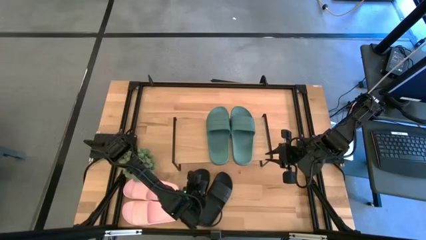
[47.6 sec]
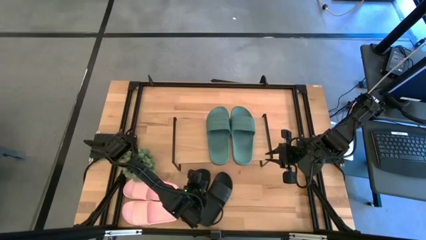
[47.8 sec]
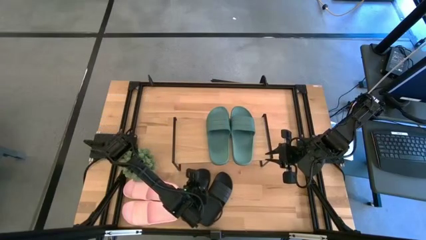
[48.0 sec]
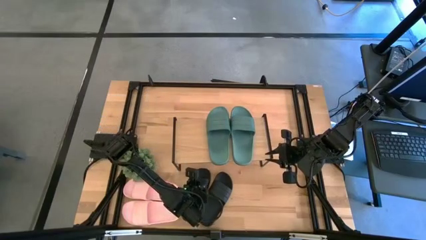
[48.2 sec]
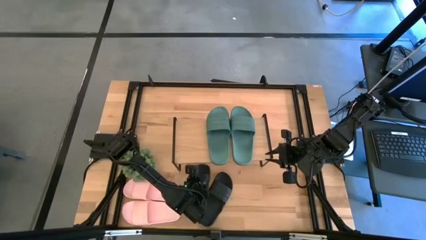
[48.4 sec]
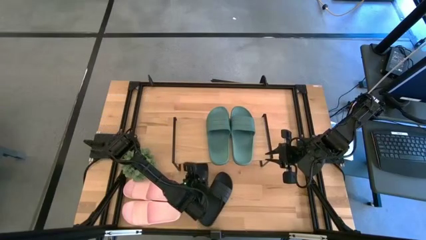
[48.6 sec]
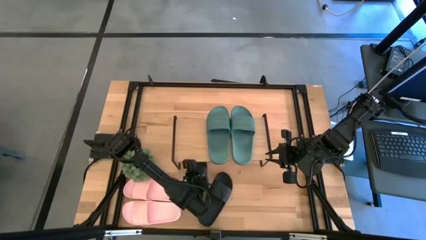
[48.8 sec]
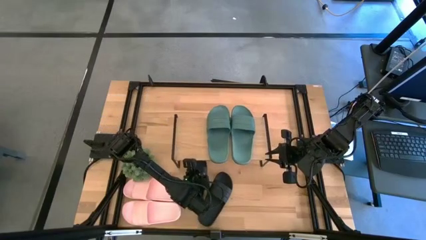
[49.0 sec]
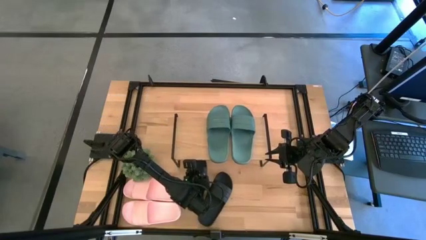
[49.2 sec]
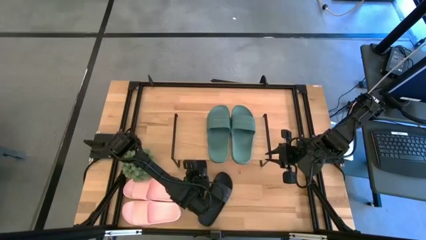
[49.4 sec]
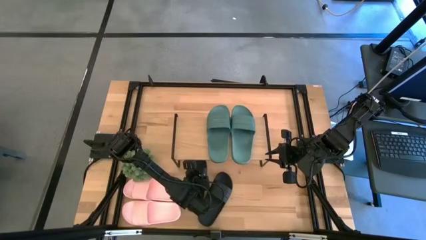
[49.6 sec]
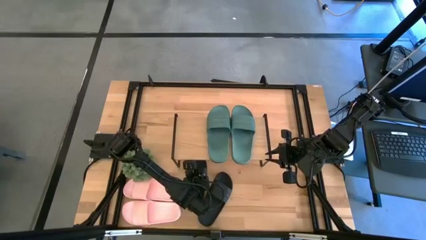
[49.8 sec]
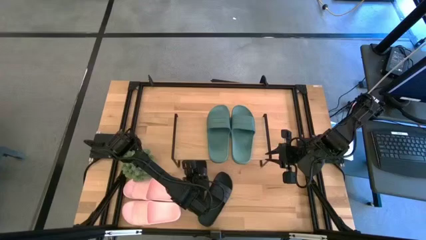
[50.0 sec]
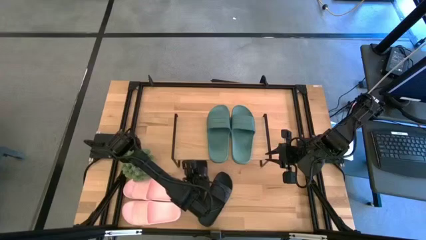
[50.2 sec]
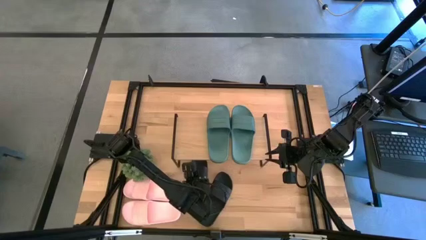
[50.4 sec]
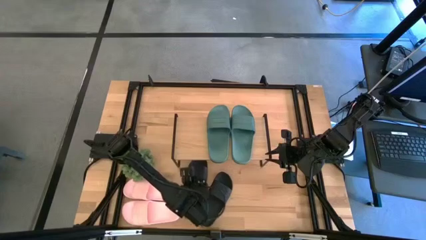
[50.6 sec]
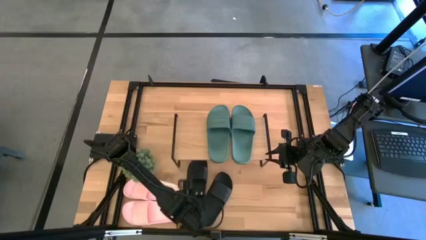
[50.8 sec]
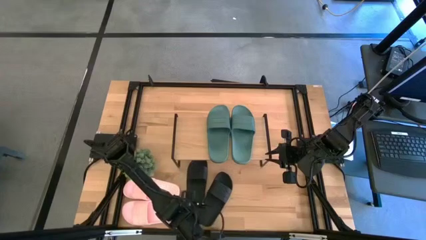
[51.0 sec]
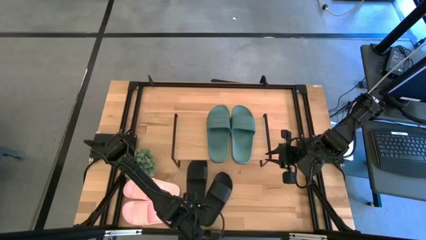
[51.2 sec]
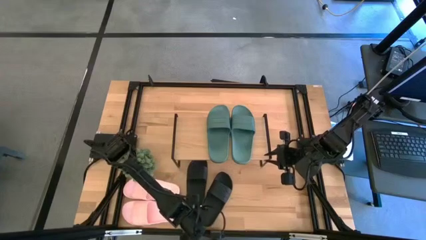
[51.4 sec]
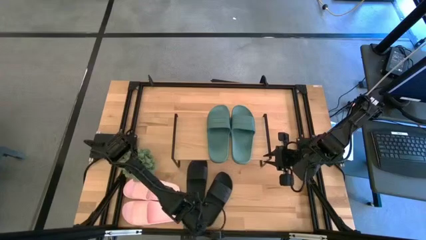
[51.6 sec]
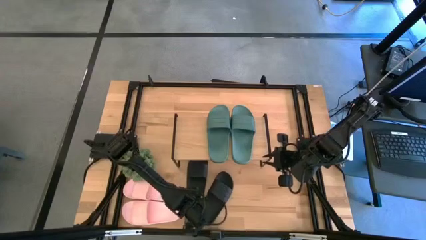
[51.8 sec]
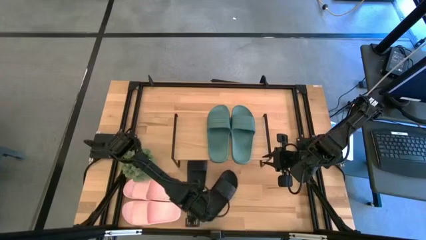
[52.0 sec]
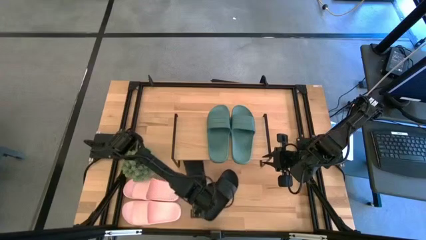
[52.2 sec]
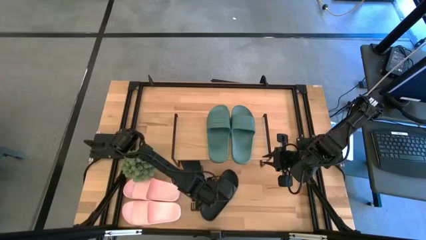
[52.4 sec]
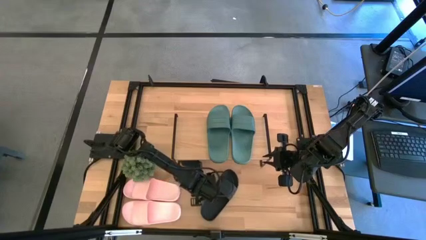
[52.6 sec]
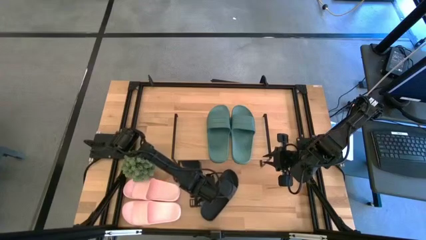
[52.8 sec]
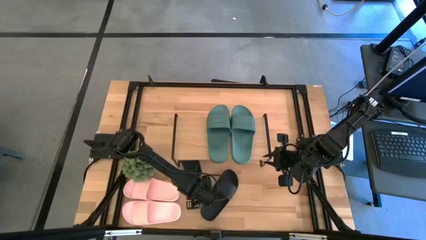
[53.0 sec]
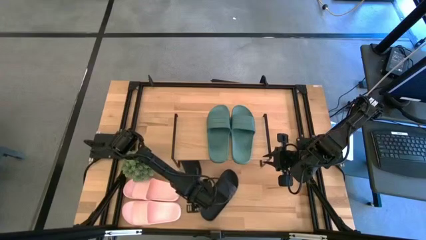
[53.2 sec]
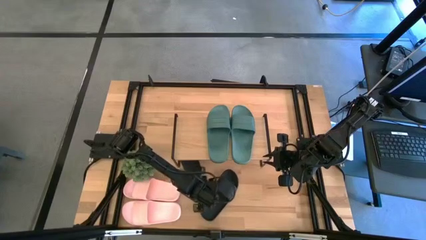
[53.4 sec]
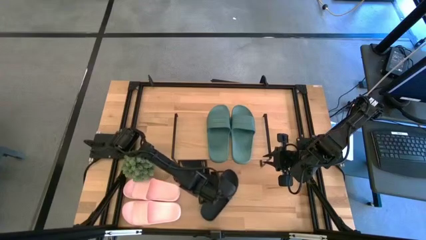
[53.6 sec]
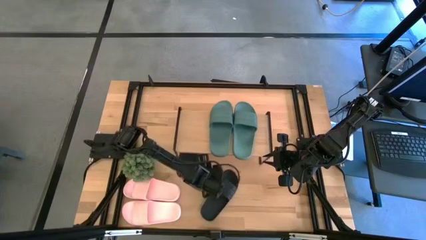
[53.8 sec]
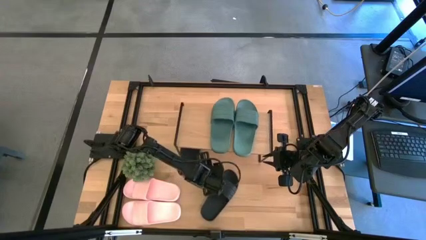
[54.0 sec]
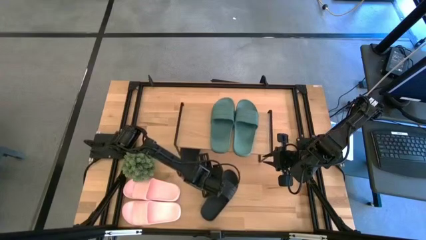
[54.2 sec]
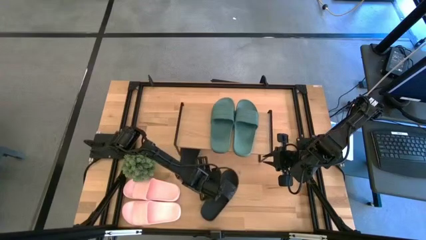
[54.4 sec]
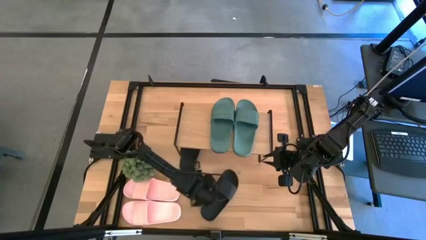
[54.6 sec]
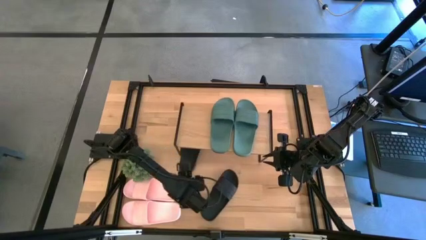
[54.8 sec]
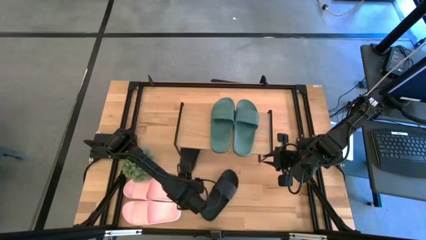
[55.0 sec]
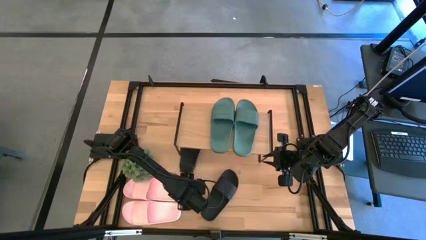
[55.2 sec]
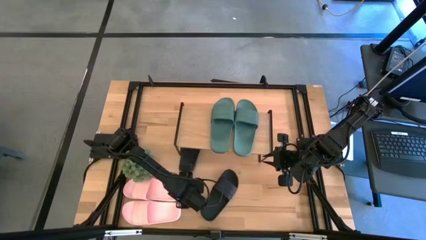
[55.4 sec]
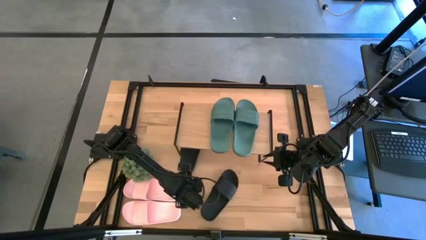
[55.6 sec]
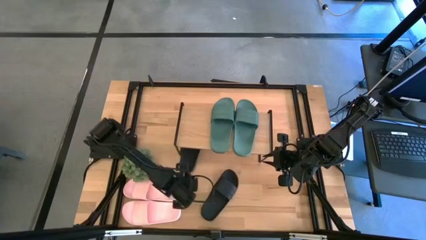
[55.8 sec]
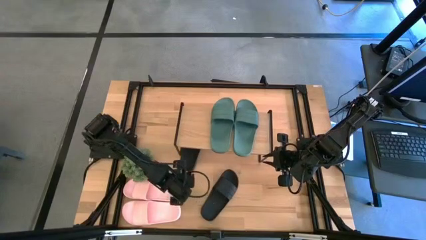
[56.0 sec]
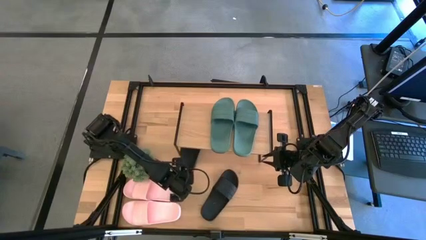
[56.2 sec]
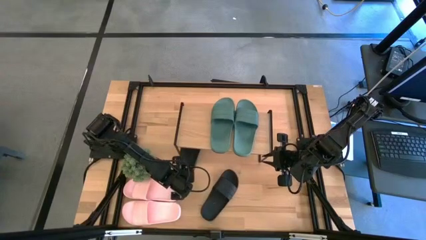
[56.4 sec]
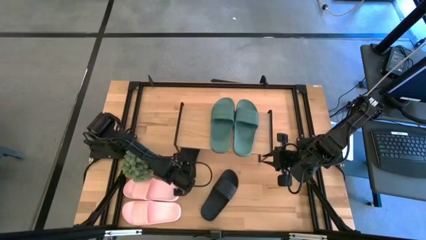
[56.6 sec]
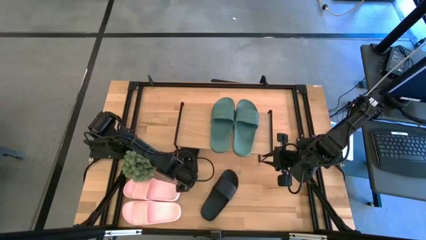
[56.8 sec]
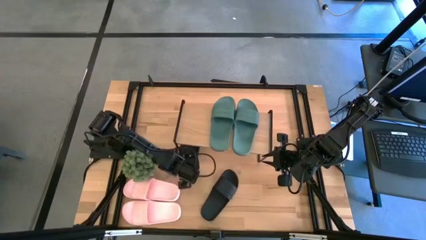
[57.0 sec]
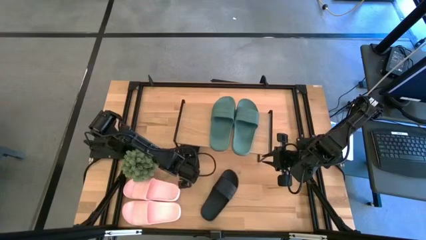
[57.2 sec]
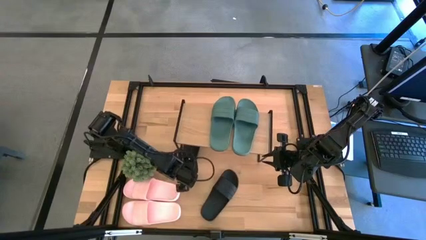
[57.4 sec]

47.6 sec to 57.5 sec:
Task: Pick and place slides into the shelf
Put the left black slipper under the shelf

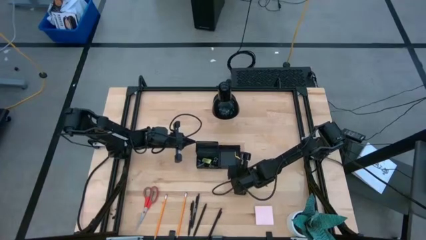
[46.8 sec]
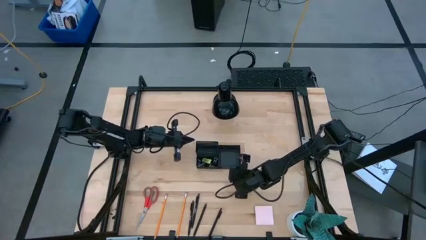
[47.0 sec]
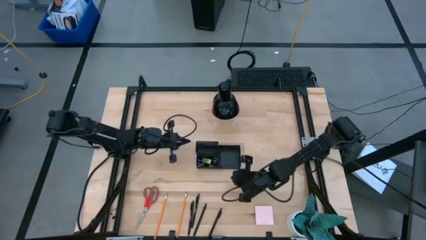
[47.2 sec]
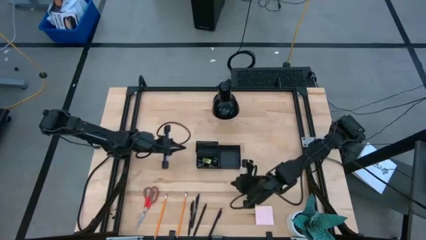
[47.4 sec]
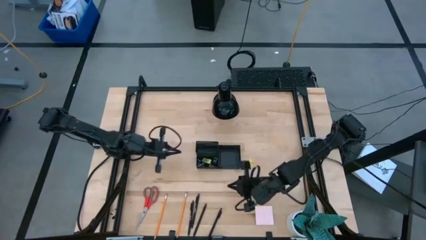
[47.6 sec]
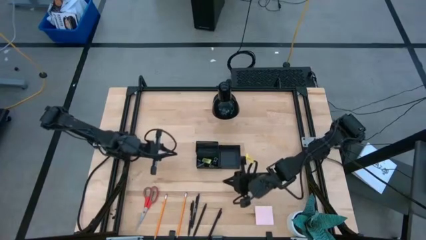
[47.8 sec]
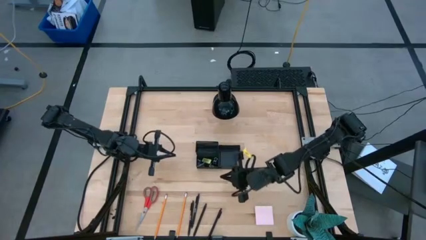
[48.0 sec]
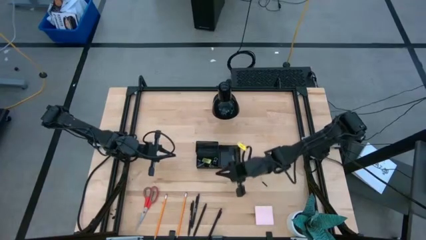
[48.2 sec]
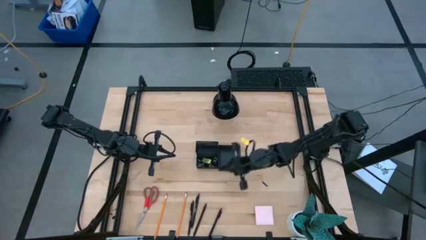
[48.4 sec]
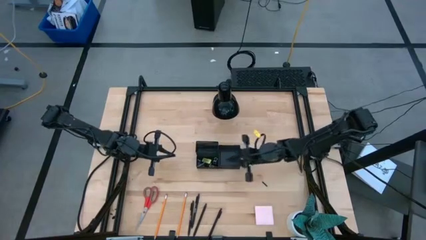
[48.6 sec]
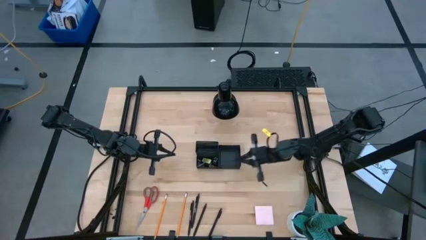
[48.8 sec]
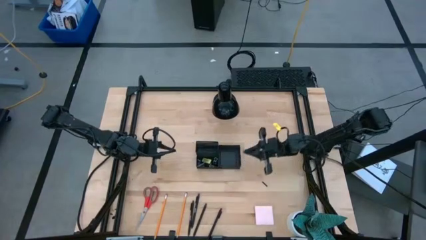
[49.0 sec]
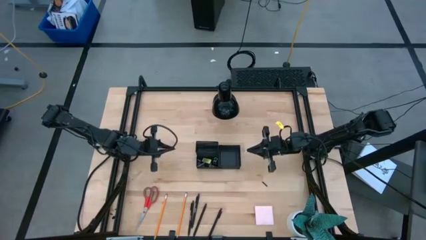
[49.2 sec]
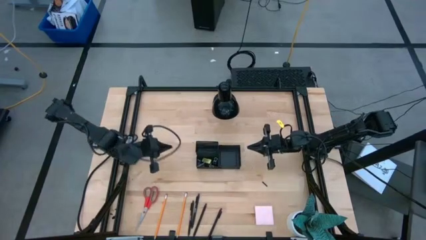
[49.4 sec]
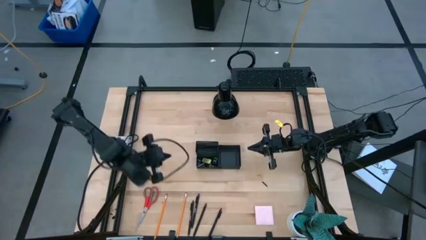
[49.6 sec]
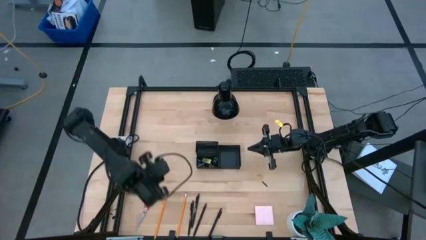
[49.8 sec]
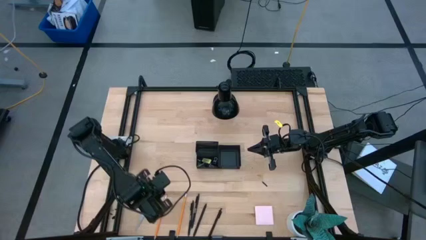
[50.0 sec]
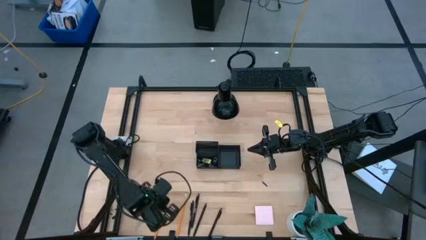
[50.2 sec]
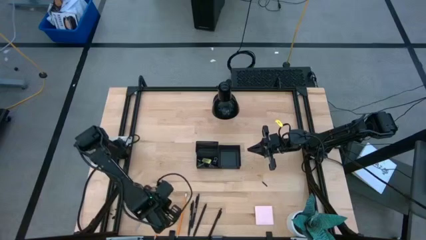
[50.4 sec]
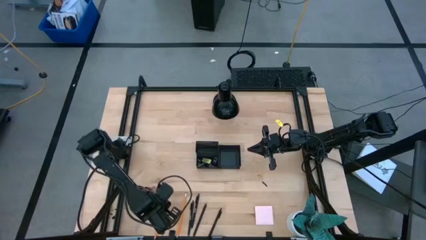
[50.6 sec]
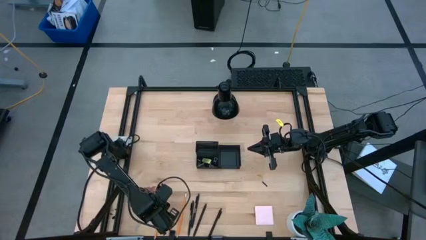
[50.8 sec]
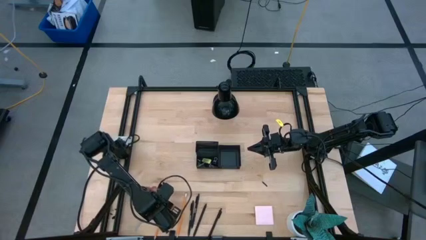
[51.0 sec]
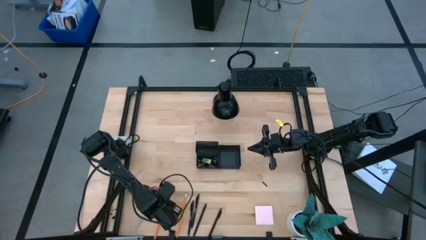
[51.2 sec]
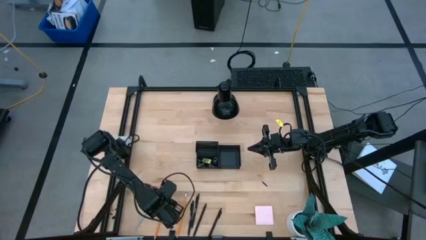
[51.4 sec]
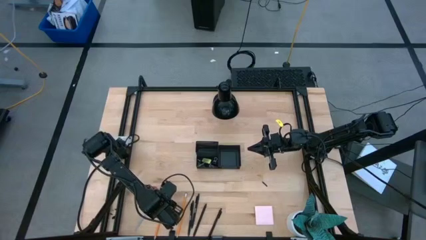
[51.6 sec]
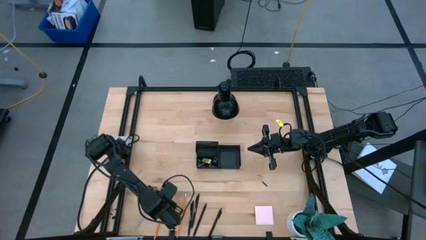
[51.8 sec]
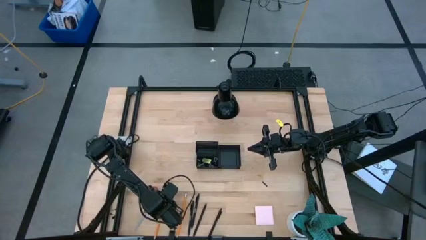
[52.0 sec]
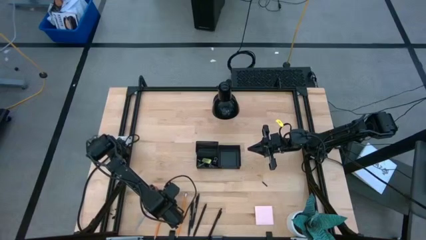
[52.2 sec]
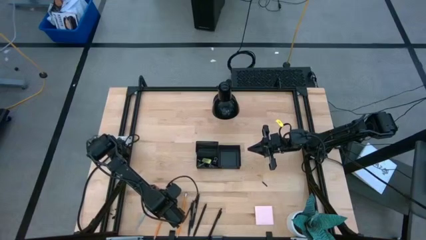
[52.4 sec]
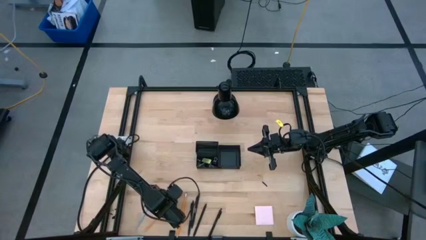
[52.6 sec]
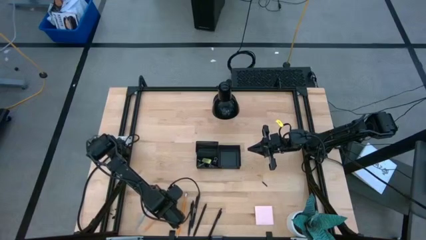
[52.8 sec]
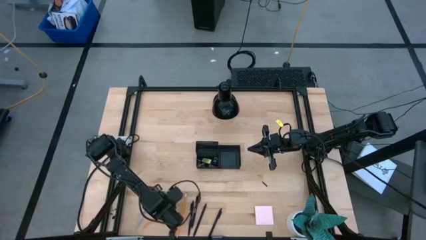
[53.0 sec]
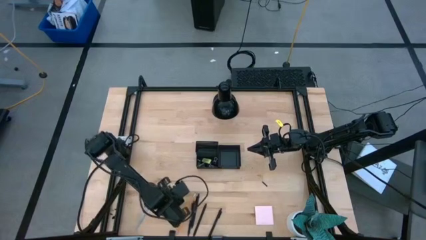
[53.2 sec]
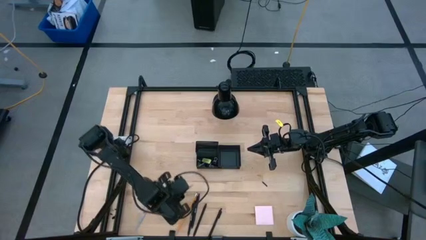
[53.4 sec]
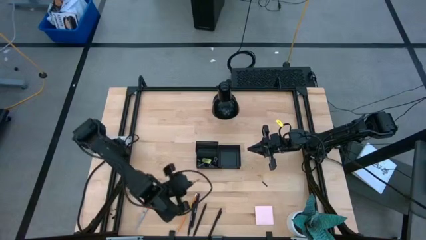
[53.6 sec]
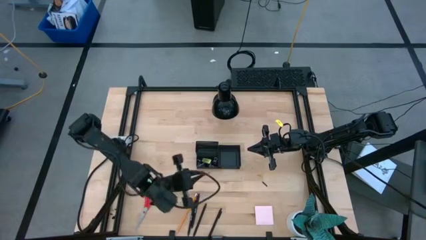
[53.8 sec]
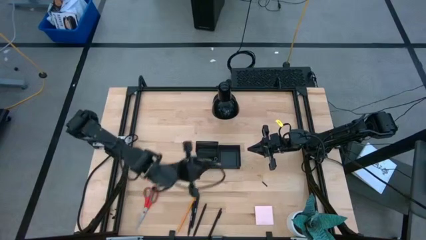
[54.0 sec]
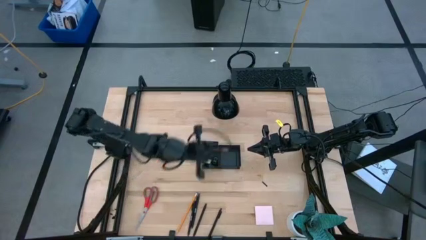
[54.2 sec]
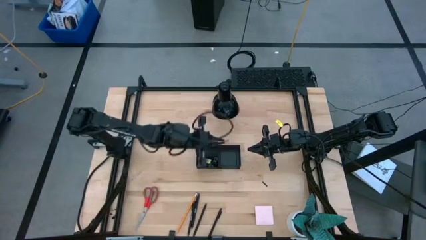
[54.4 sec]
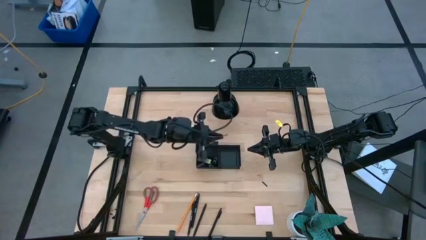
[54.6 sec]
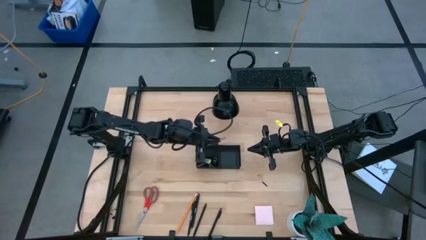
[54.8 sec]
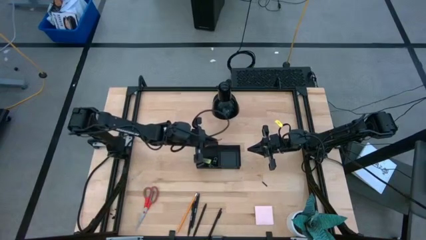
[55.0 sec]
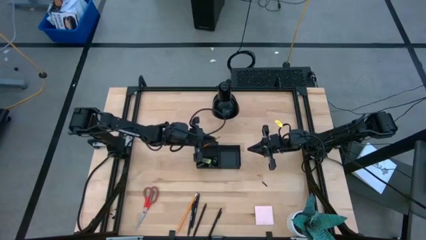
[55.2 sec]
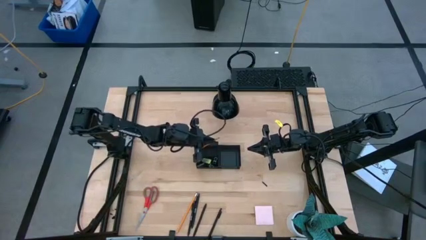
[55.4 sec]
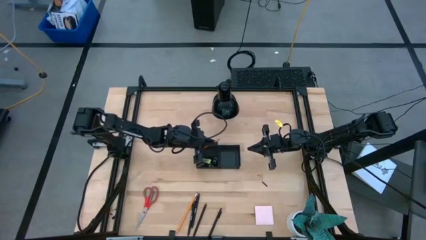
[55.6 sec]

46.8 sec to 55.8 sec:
Task: Pick and place office supplies into organizer
Put the left pencil into the top left section of the desk organizer
